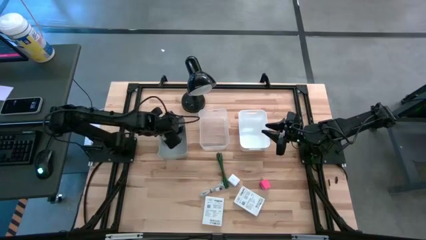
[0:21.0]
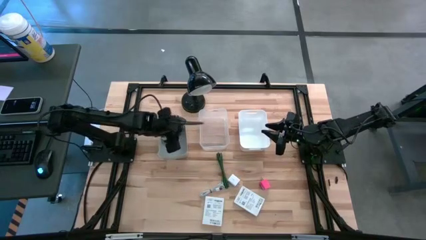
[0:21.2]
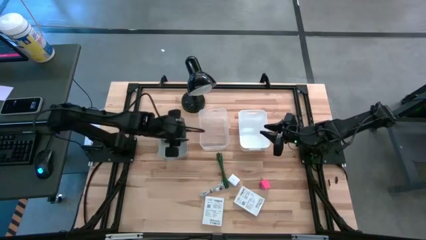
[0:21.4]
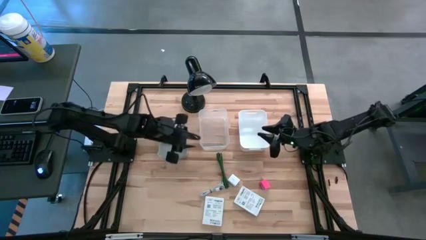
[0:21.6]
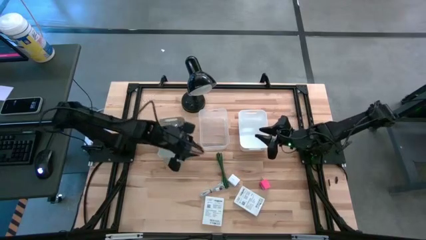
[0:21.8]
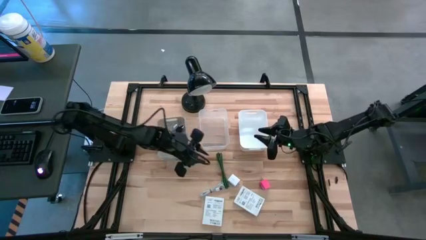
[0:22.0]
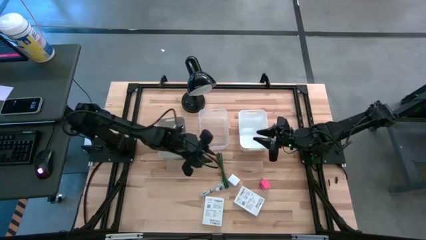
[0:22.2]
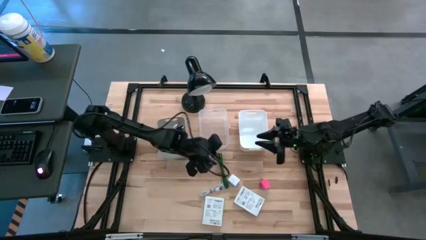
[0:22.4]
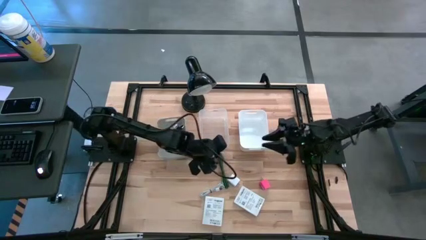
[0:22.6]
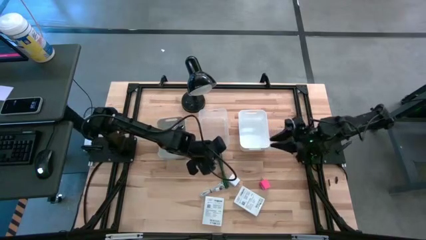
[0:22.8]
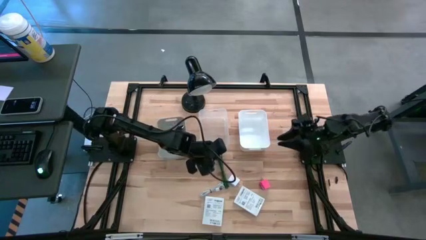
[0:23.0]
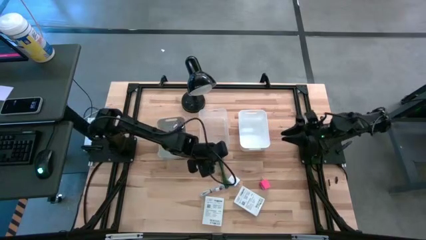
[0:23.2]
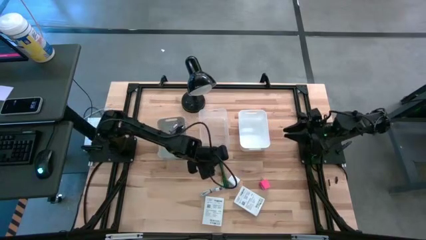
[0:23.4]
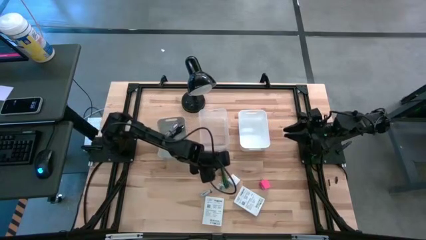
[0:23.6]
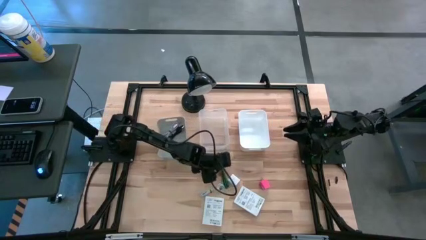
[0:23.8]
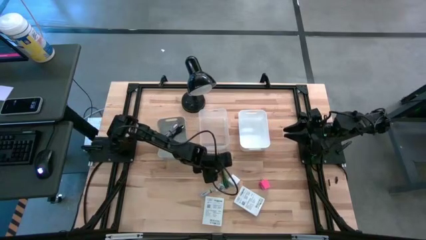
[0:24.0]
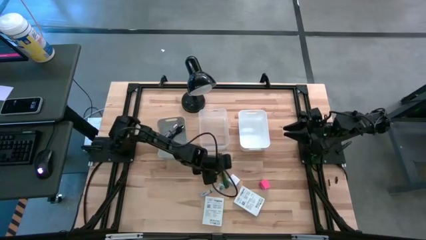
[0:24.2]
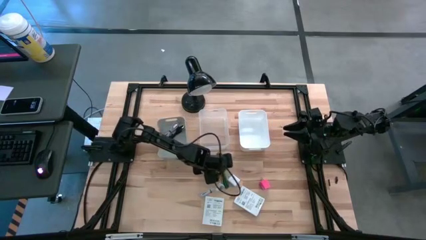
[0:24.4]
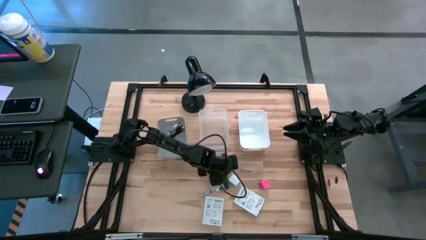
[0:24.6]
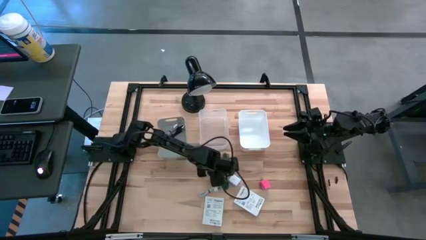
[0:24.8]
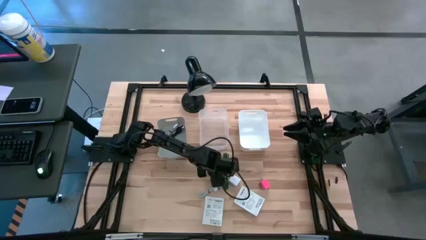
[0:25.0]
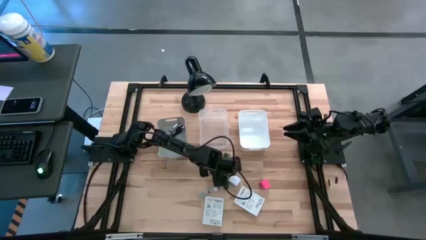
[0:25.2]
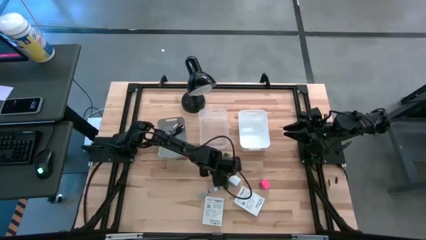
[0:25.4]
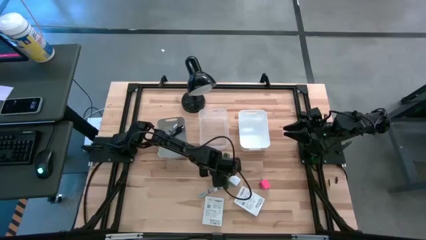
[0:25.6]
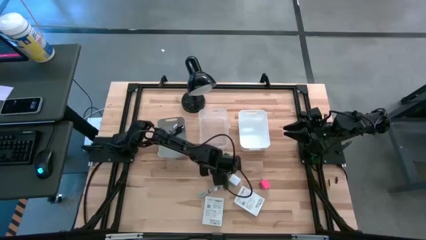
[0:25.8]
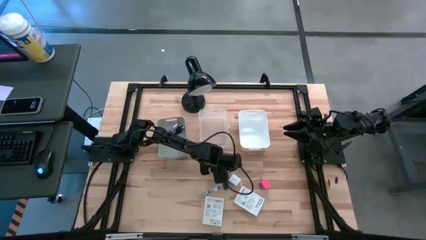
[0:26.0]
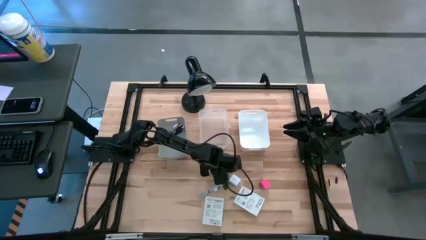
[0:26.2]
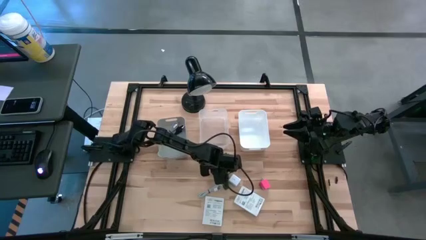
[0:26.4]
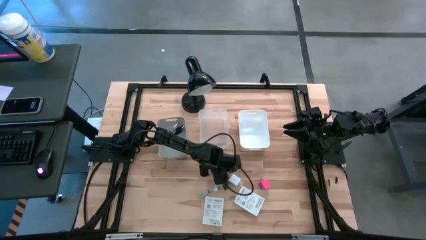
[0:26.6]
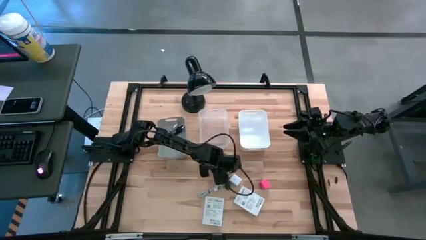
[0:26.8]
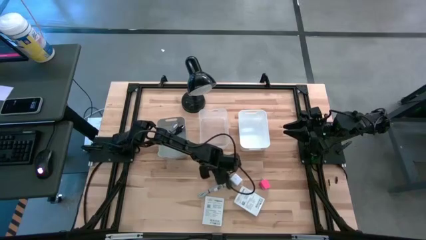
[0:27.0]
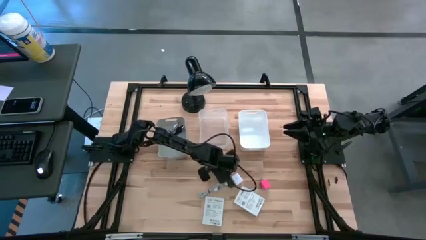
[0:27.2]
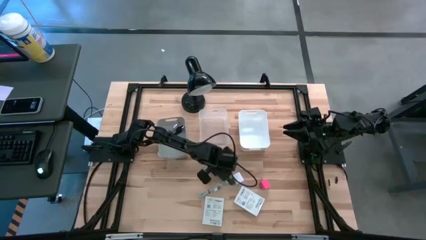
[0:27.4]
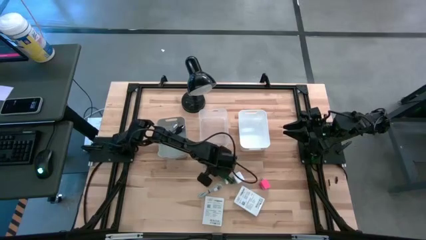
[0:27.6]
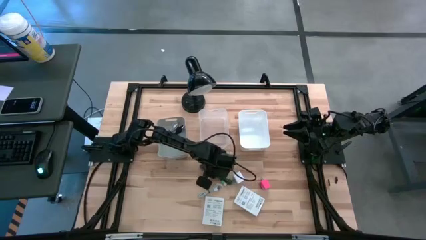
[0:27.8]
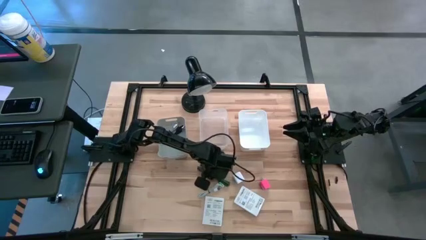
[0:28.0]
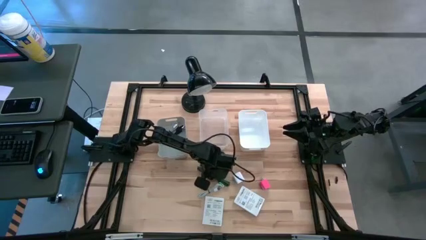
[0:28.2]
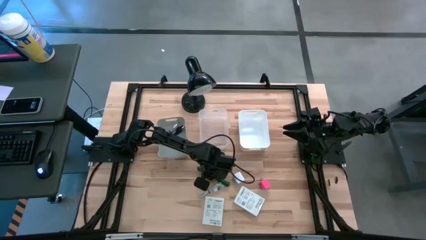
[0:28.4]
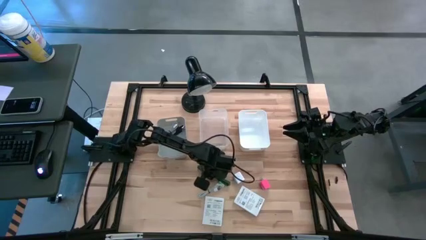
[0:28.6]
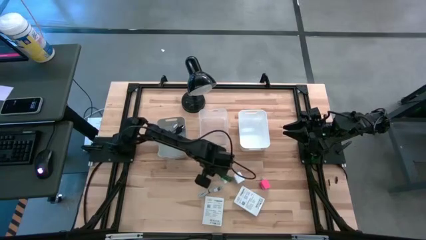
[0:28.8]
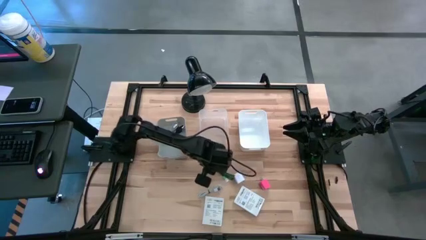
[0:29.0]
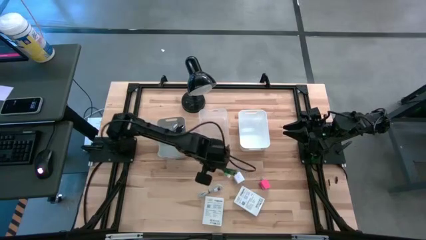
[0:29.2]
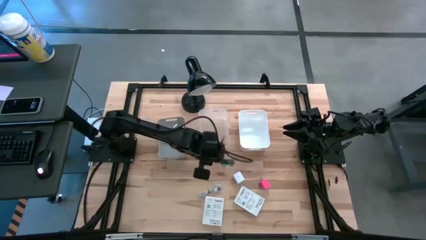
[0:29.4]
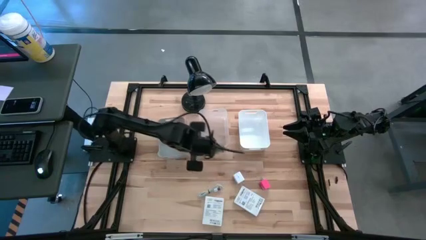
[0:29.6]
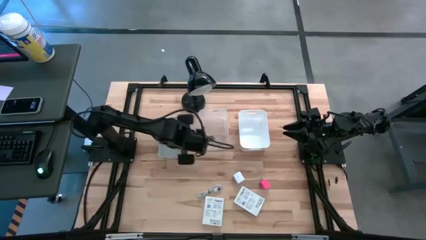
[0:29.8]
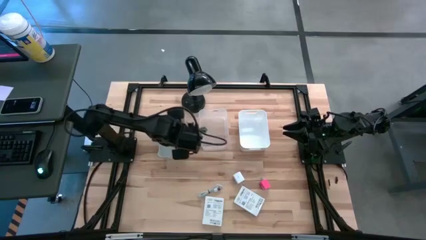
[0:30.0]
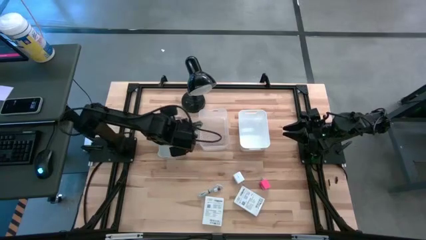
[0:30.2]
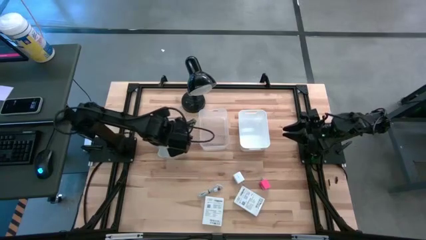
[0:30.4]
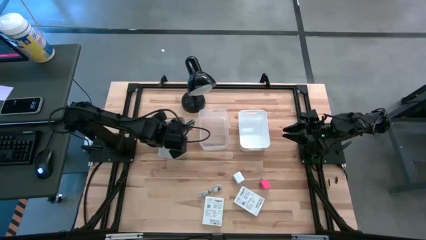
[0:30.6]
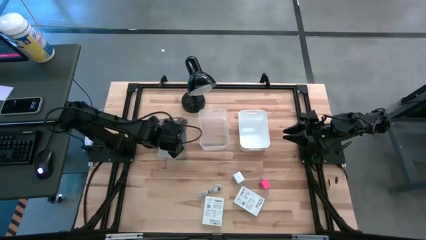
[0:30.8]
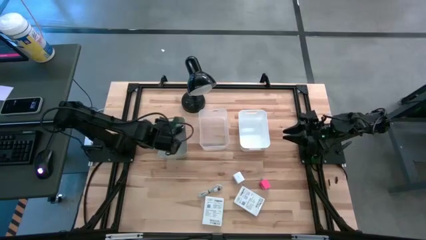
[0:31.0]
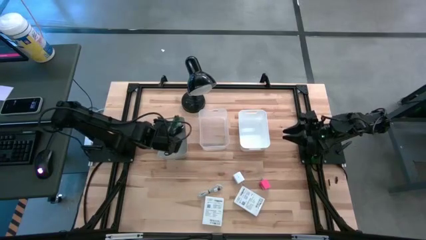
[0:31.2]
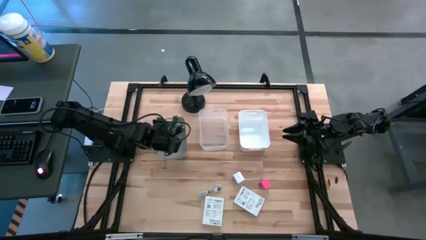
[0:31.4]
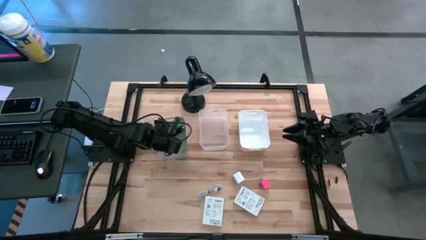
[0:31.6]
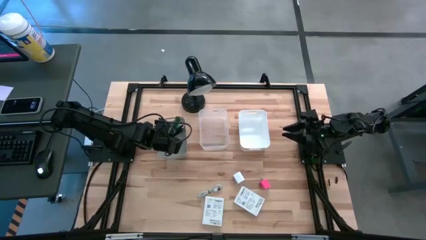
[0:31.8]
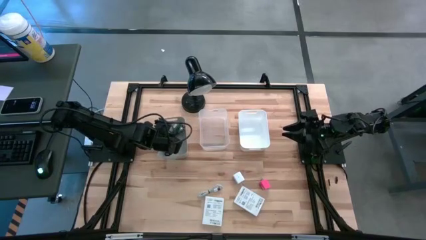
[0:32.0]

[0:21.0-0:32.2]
Task: Pick and place items into bin
Put the green charger cable into the gray bin

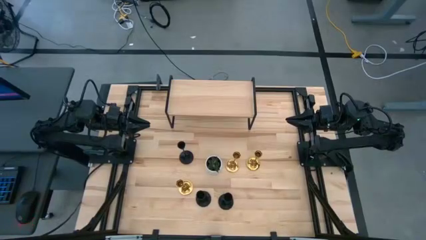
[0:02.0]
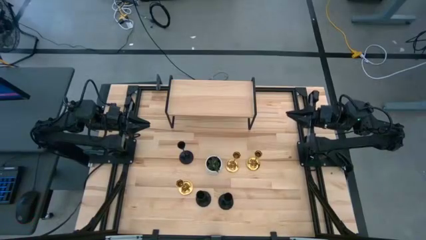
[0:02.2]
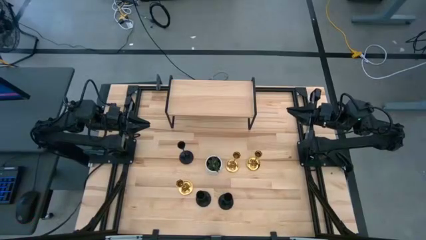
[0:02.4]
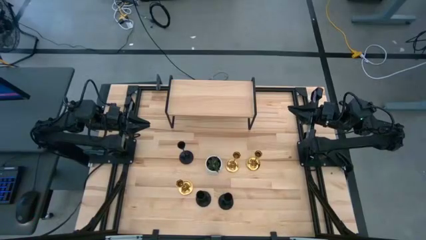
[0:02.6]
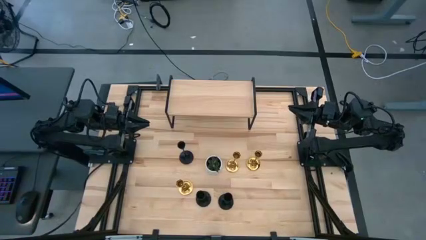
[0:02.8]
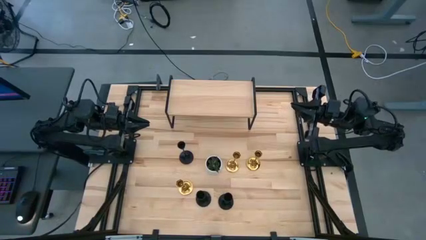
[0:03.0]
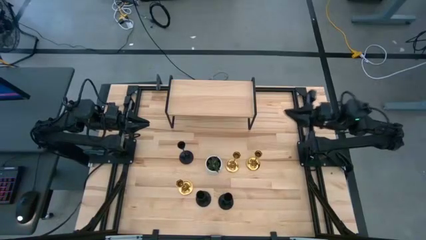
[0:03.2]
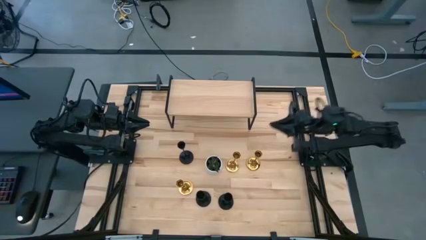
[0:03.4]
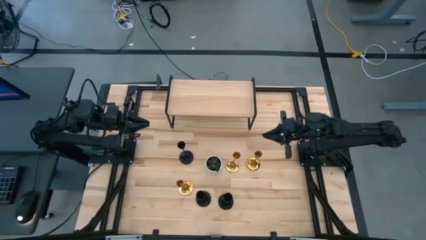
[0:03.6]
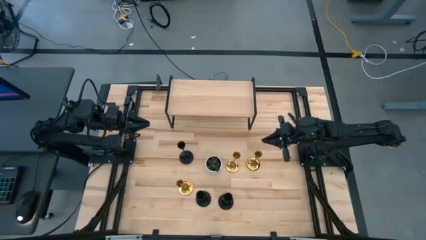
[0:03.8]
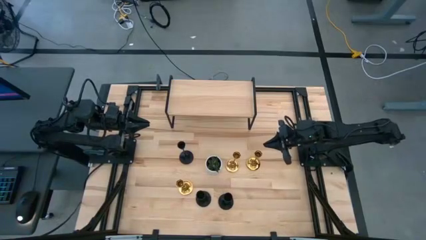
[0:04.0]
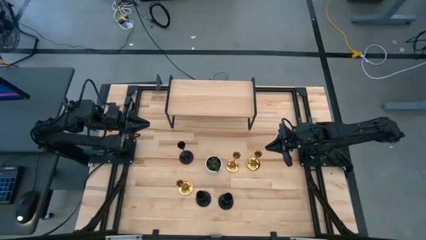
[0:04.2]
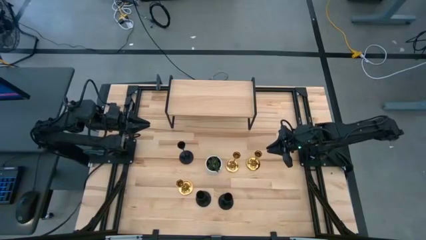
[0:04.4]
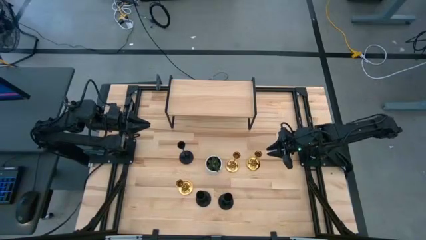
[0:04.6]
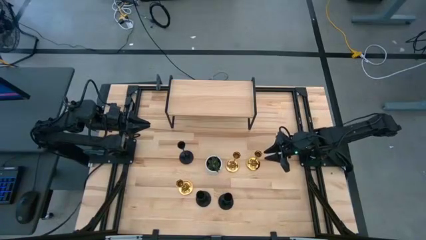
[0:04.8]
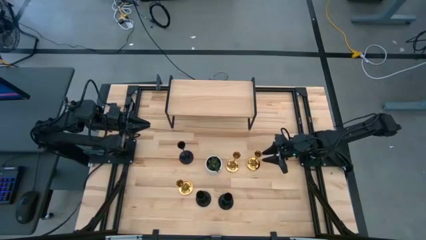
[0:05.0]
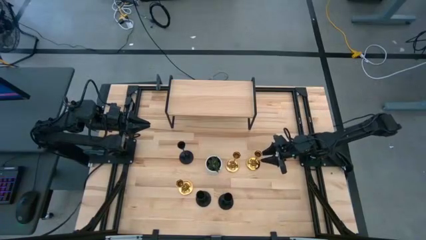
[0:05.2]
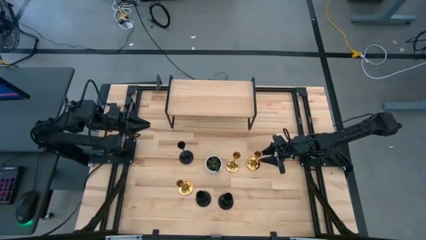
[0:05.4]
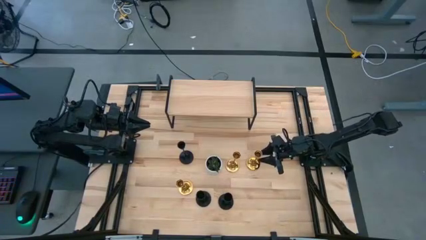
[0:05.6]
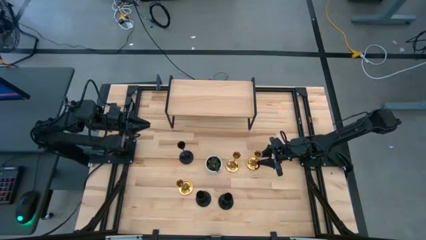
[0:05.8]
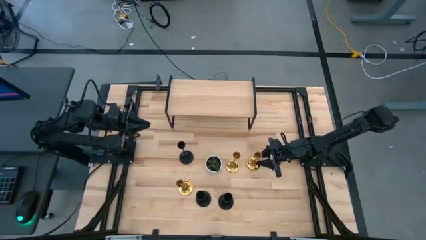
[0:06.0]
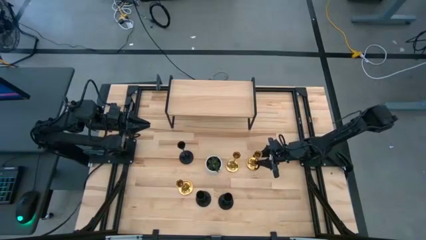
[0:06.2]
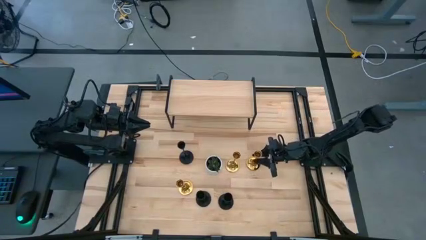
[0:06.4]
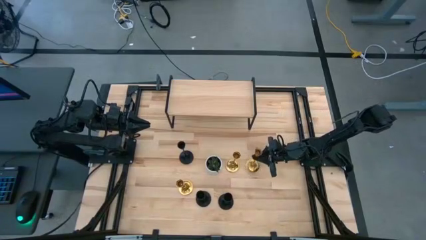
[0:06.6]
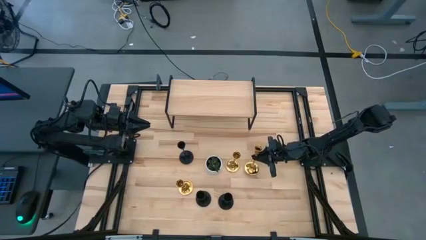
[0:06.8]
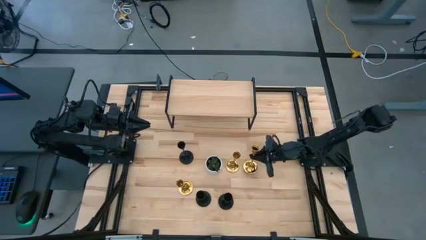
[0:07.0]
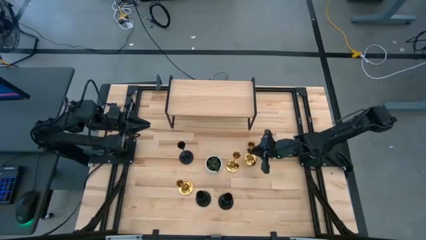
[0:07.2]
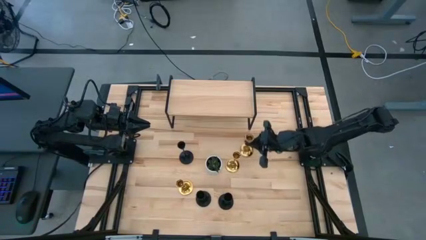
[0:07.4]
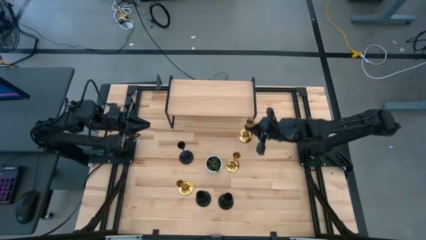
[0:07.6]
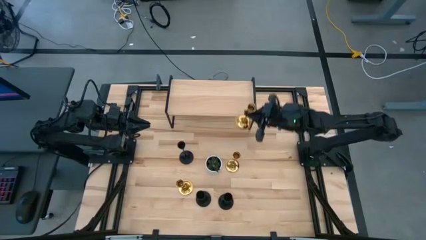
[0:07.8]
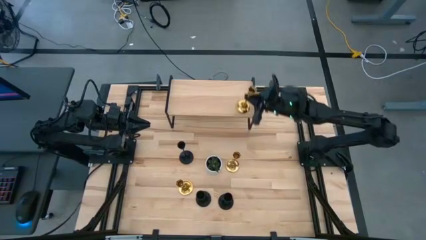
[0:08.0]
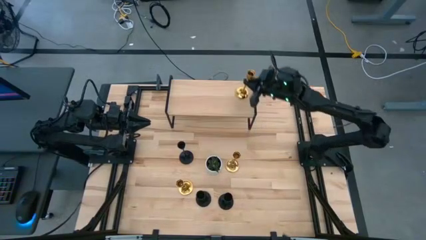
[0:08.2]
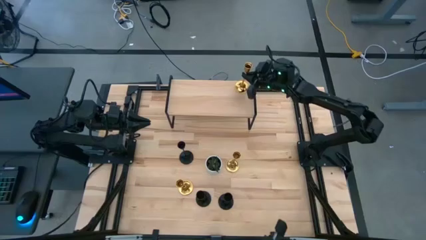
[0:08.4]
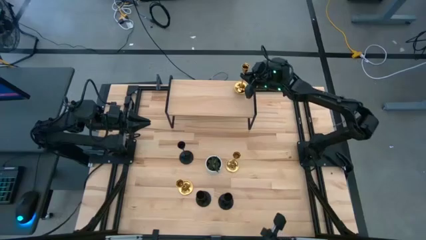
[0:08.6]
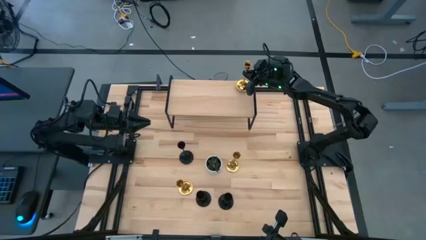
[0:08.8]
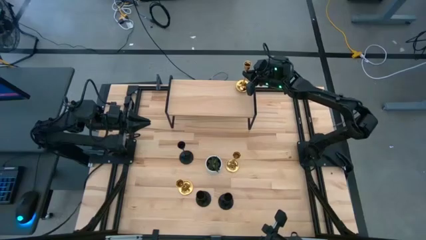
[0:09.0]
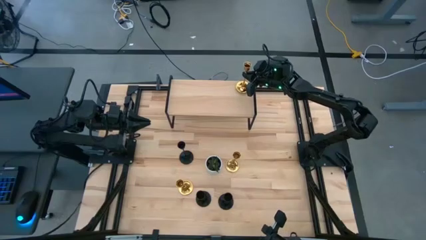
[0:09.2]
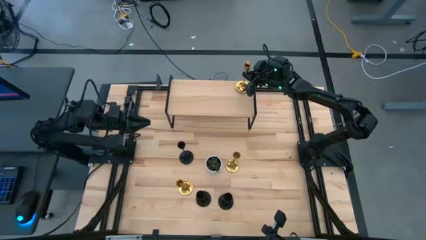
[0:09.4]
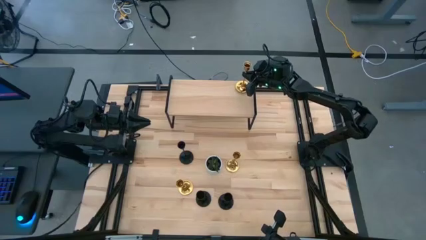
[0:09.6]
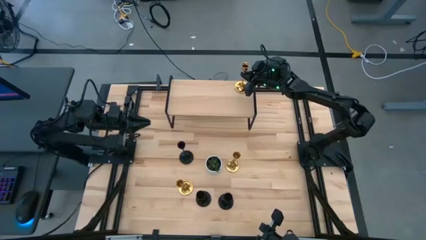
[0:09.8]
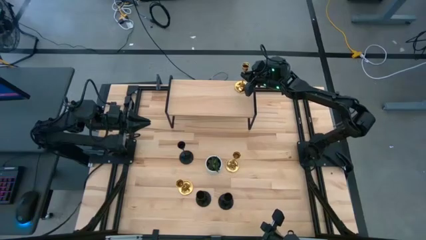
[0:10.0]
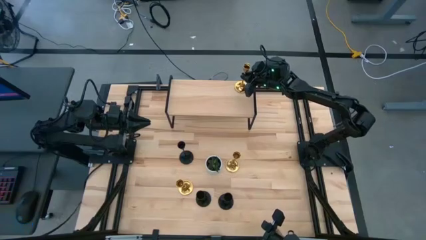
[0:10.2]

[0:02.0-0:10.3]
Task: Pick & Place candle stick holders
Put the right golden candle holder on the shelf
